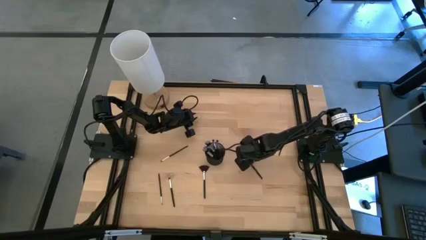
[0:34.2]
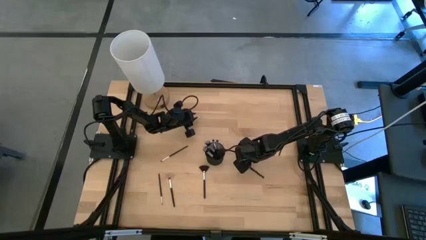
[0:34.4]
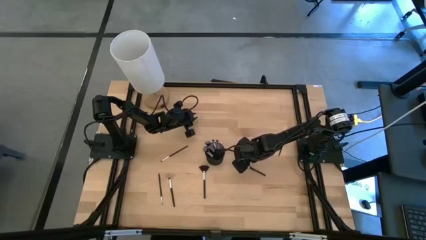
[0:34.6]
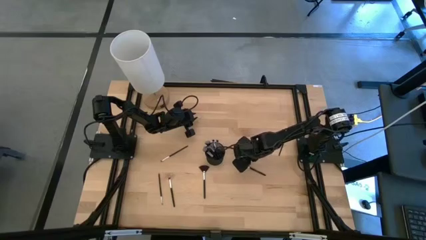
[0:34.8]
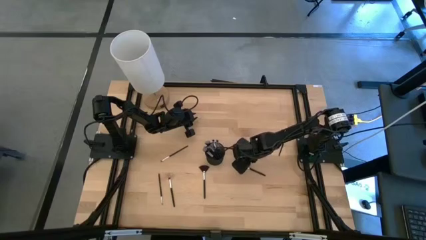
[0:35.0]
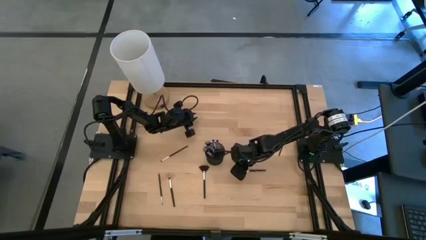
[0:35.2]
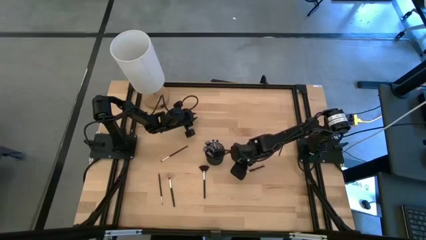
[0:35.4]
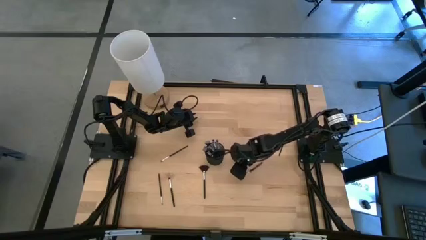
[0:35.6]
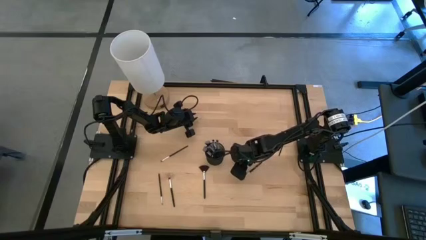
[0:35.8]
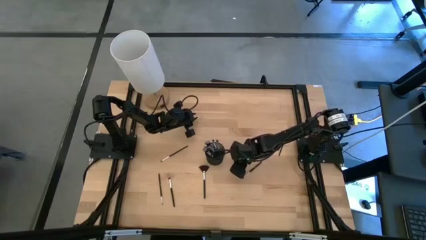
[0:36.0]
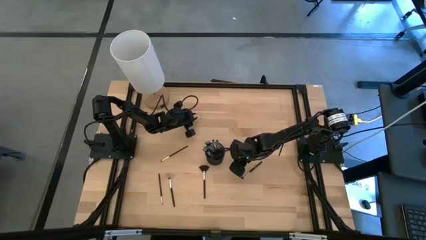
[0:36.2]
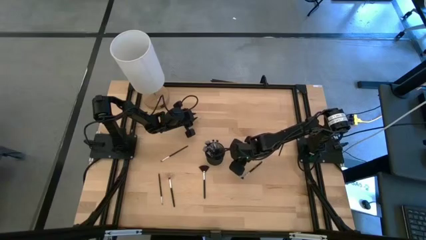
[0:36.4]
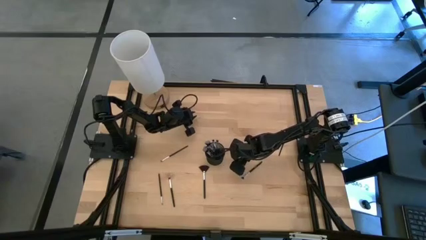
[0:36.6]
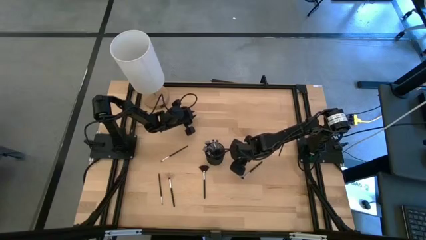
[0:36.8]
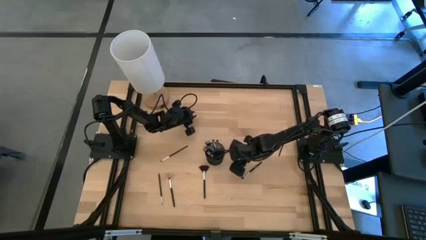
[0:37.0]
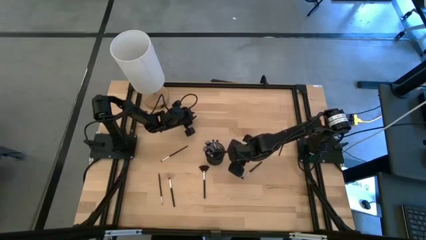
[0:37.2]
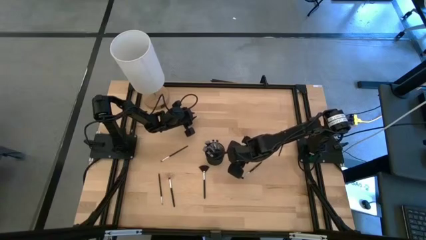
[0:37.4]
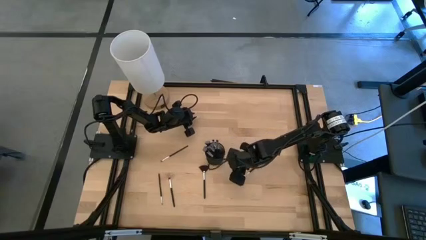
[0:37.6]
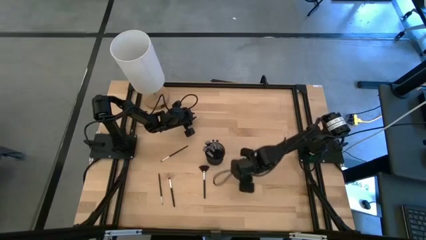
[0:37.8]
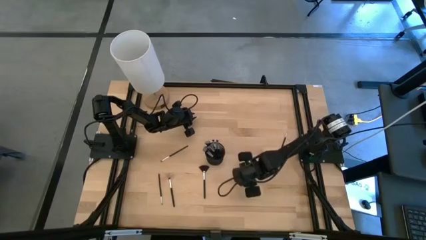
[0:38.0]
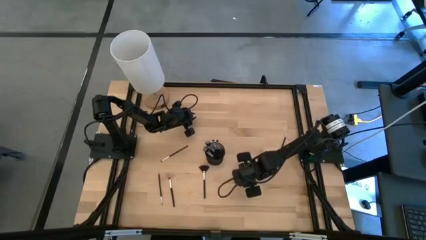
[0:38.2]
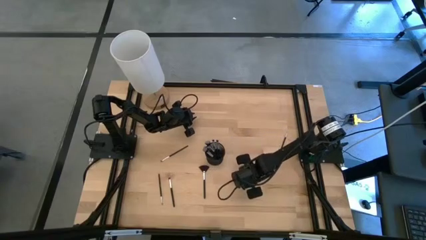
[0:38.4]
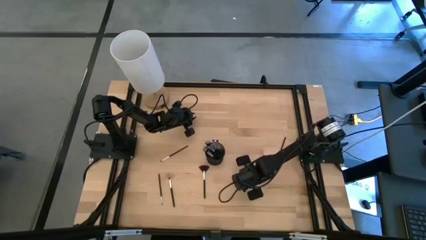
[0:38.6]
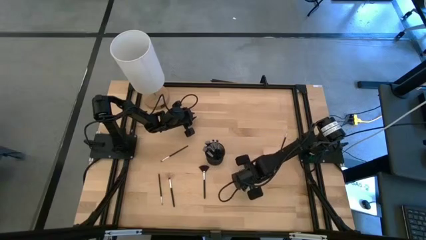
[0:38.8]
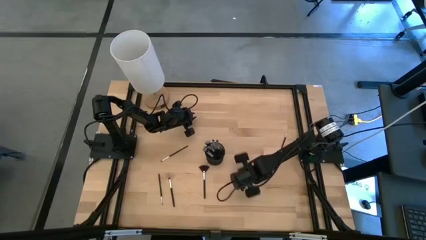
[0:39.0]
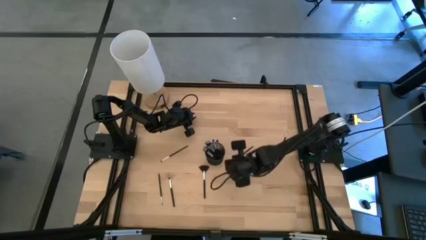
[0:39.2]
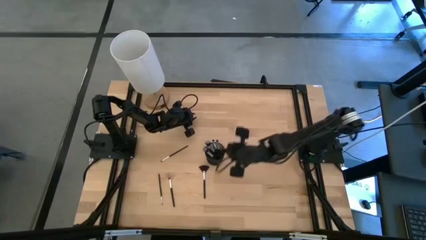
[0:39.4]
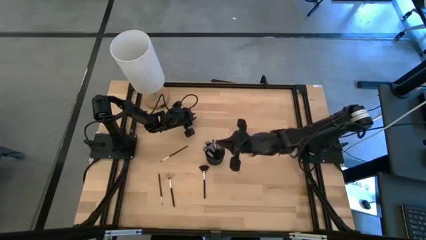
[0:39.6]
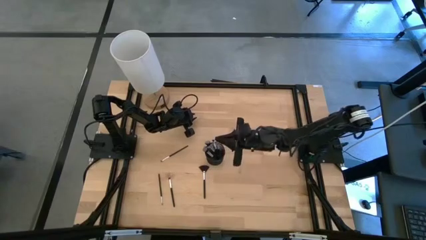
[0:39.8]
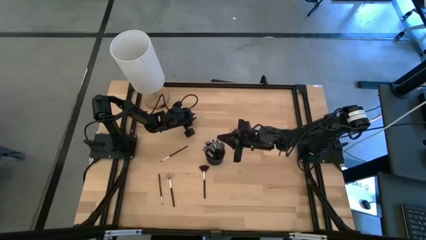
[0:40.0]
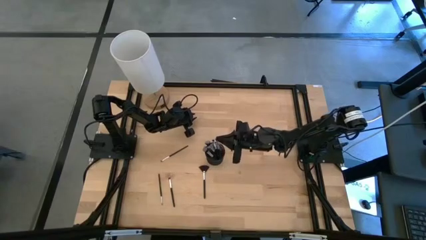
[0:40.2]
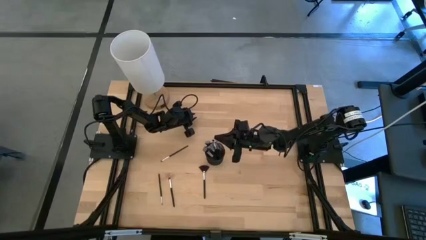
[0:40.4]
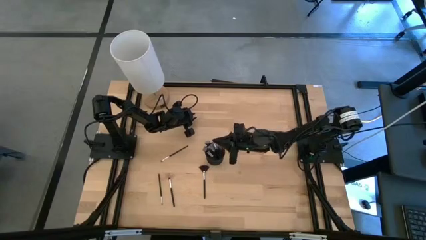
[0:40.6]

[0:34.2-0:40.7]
Task: Pick & Place Makeup Brushes
Put the eyeshadow brush into the makeup organizer

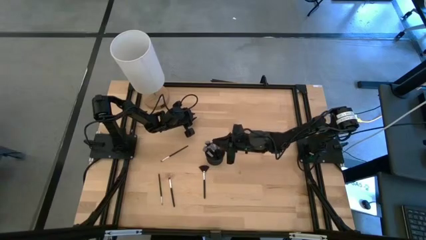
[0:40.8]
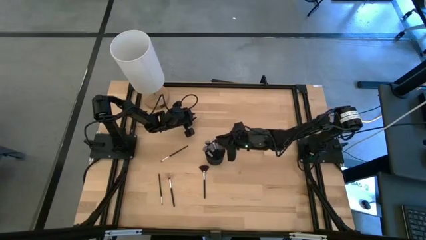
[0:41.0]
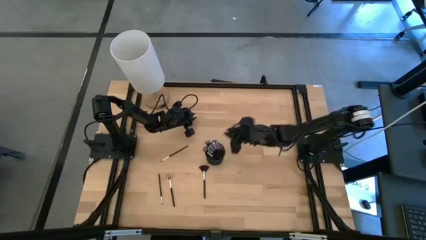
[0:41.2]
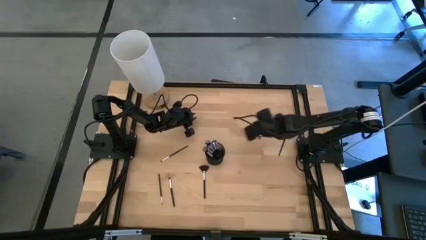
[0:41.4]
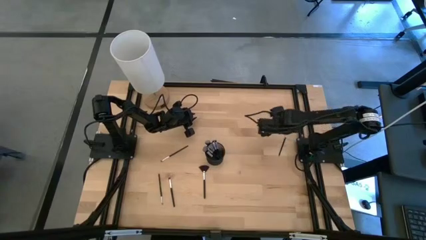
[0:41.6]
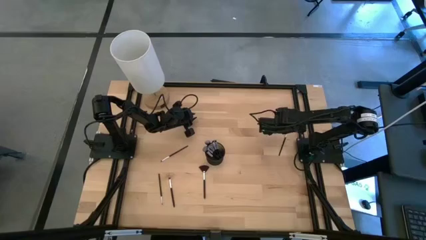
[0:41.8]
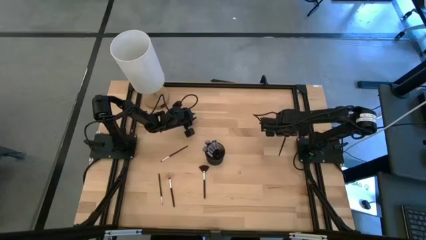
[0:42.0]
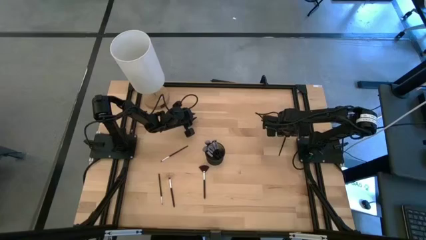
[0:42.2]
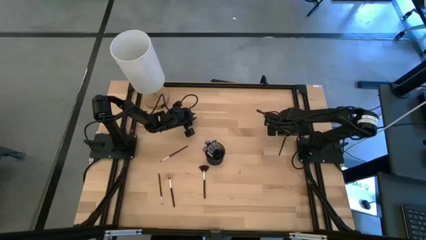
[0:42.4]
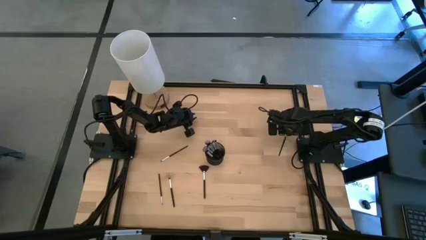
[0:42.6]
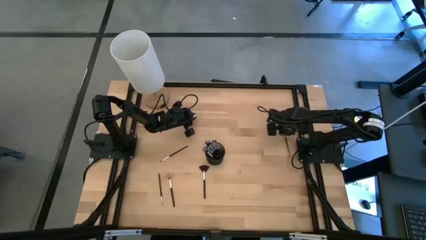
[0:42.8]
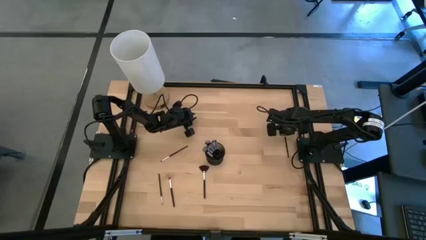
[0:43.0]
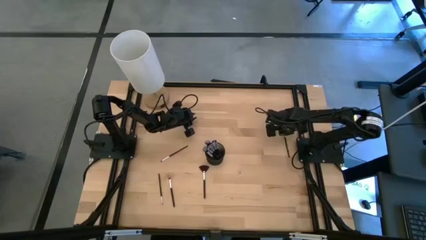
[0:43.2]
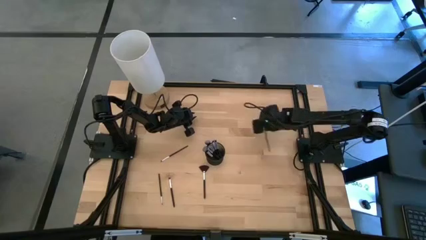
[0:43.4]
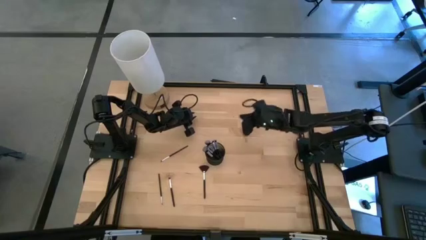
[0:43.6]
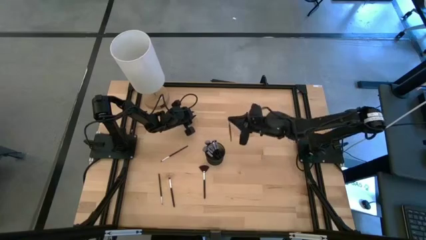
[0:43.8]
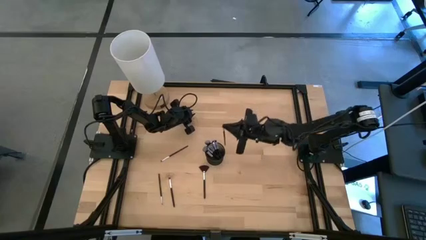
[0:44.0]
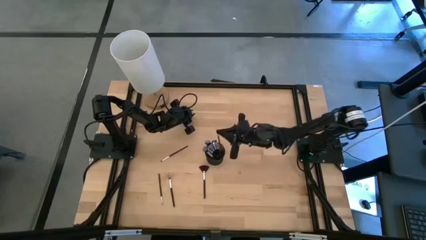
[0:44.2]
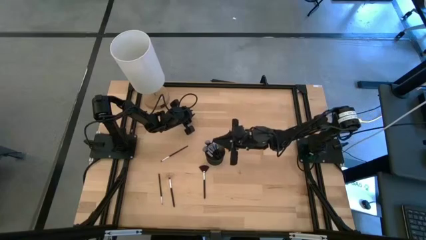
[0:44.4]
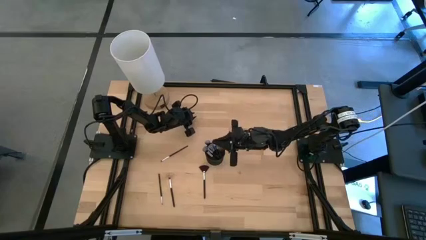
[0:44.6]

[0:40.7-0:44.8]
Put the eyeshadow brush into the makeup organizer

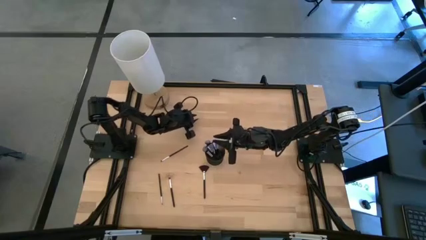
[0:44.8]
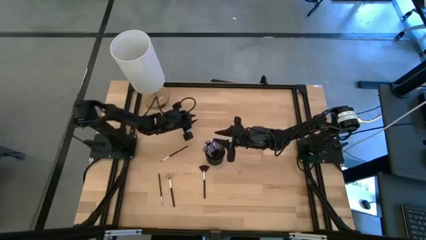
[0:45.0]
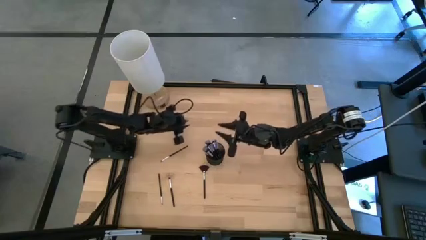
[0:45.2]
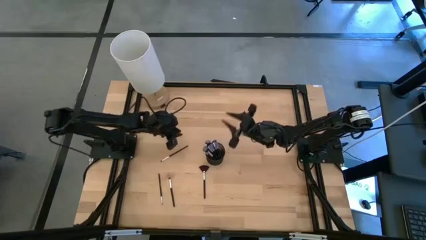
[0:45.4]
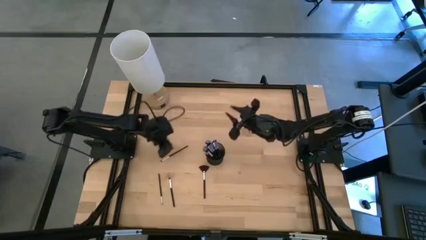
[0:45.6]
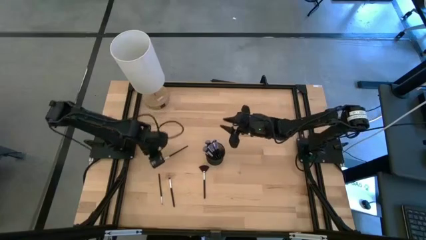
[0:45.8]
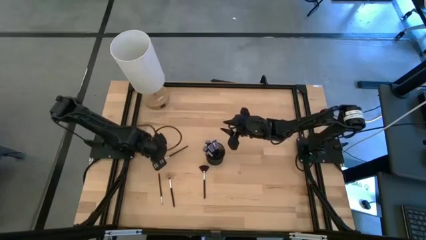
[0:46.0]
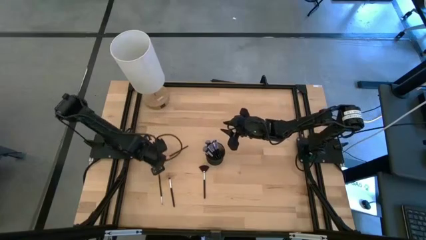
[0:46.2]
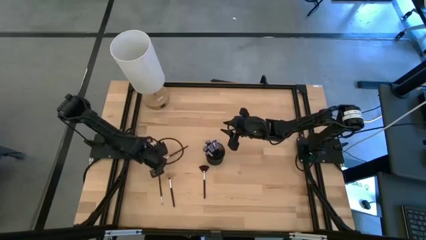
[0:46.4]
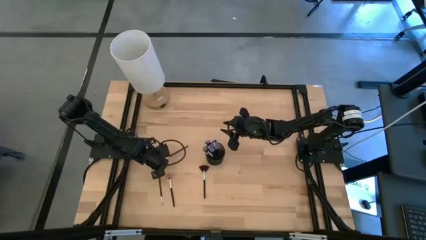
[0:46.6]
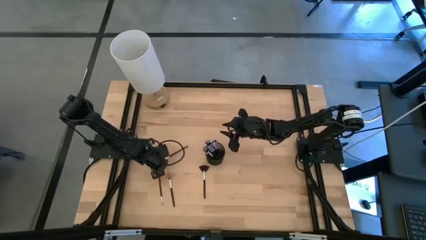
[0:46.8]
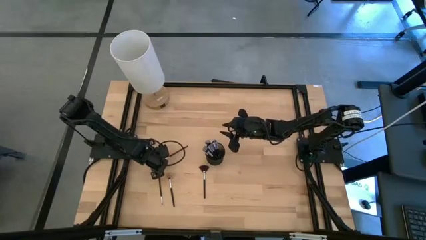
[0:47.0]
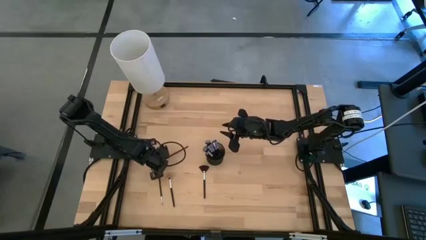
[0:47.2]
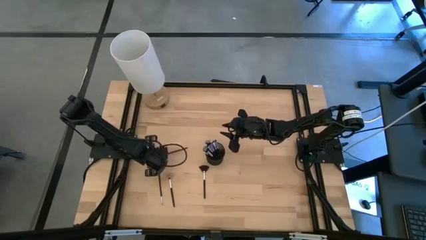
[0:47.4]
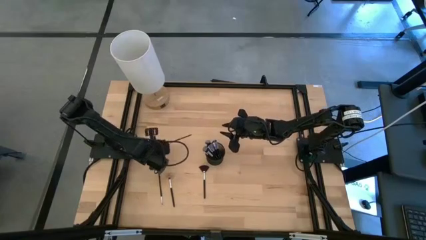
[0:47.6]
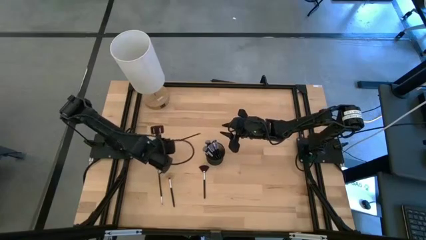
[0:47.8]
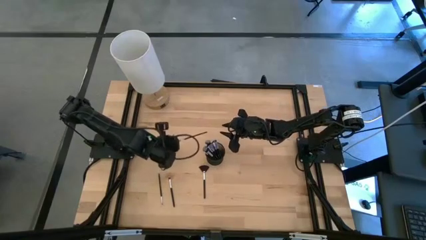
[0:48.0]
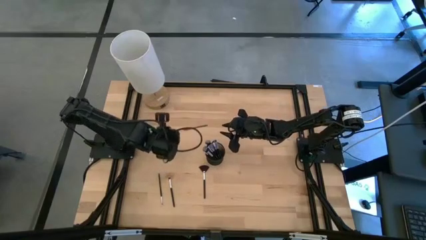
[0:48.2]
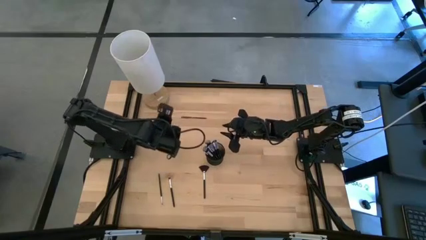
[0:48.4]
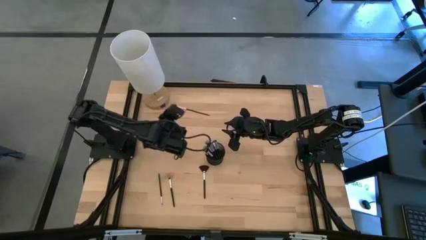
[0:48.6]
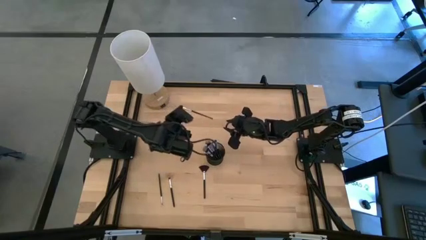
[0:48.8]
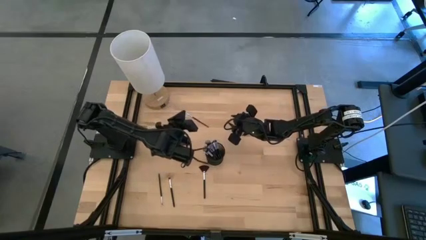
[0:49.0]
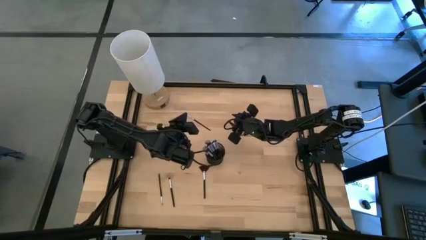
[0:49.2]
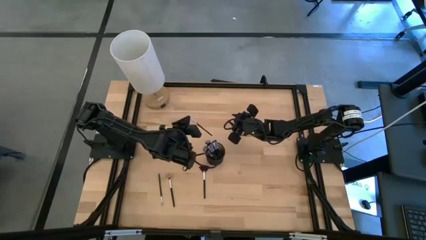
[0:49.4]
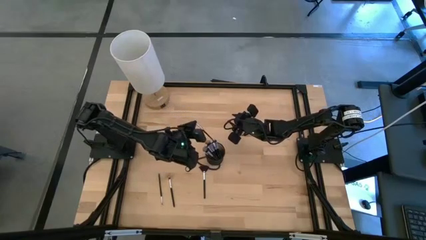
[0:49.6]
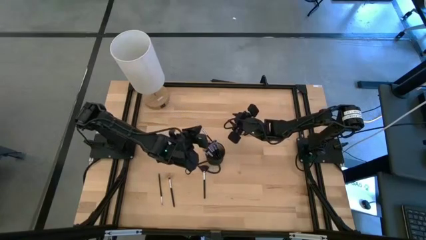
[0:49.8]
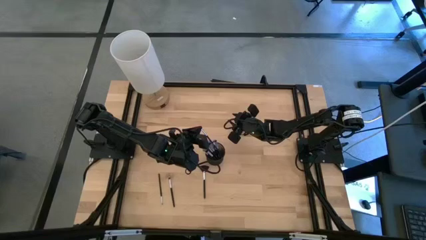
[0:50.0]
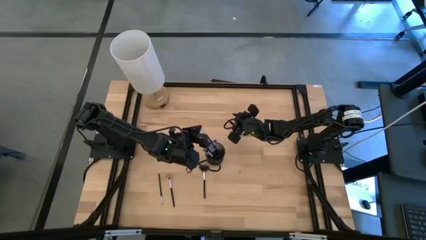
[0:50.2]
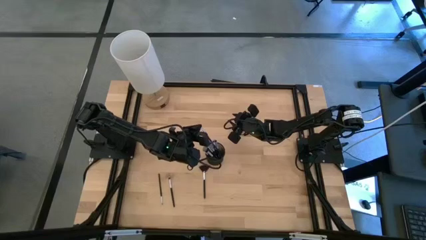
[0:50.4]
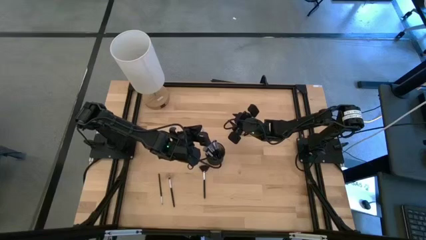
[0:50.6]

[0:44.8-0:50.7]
Put the eyeshadow brush into the makeup organizer
